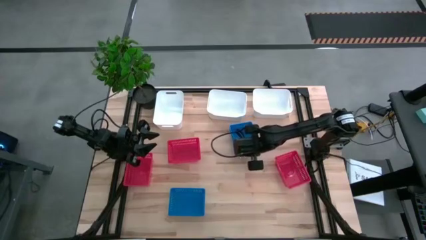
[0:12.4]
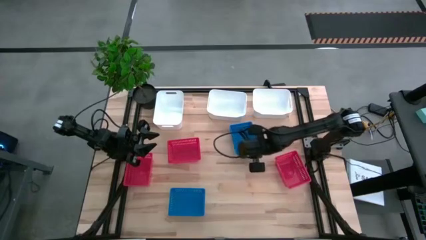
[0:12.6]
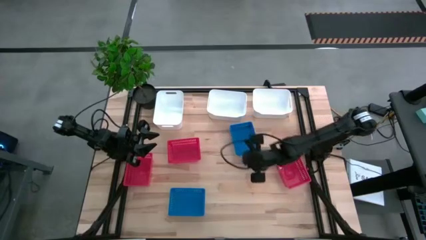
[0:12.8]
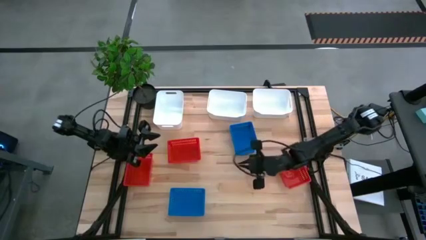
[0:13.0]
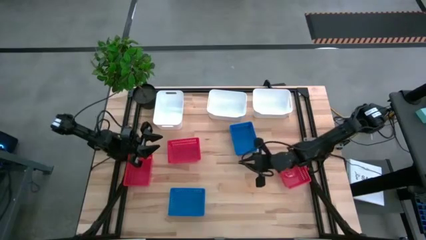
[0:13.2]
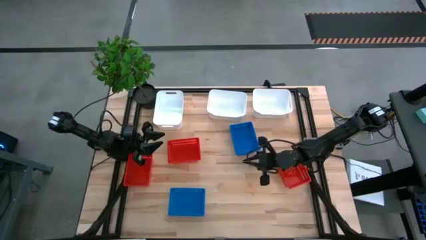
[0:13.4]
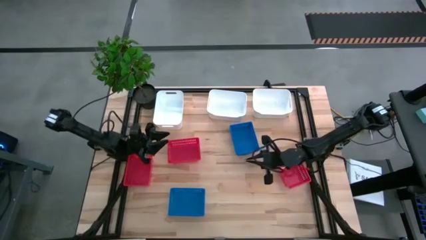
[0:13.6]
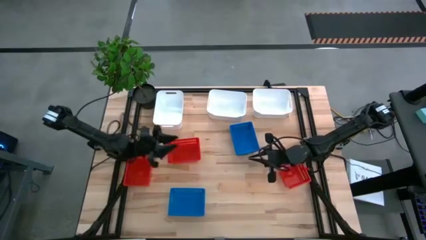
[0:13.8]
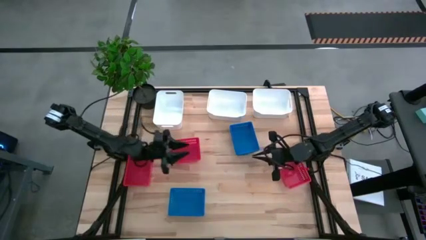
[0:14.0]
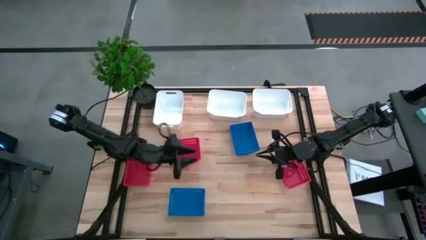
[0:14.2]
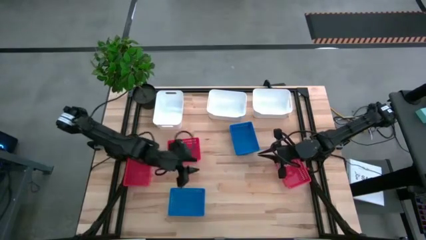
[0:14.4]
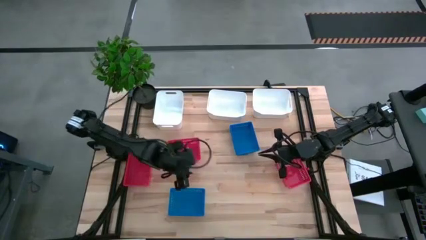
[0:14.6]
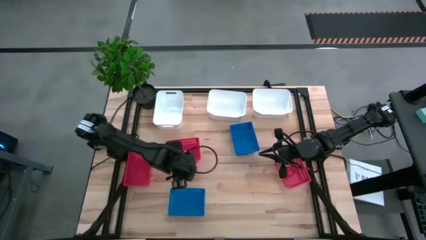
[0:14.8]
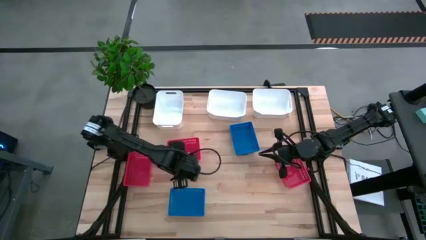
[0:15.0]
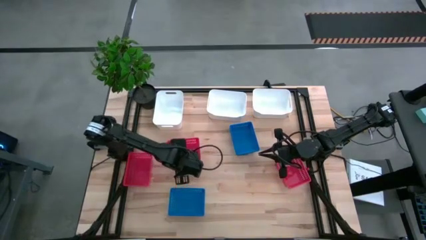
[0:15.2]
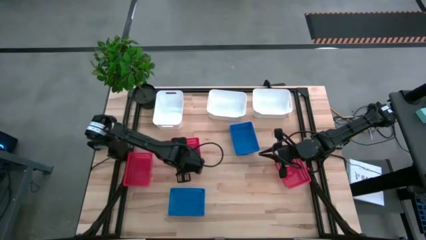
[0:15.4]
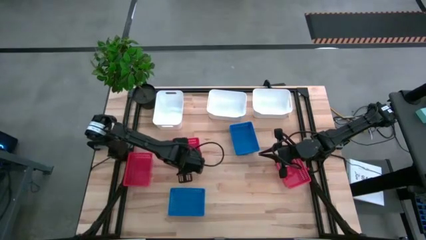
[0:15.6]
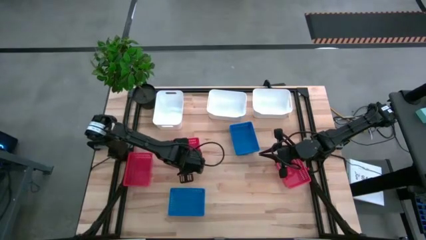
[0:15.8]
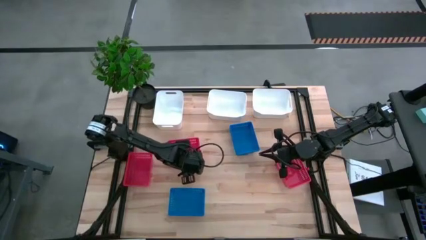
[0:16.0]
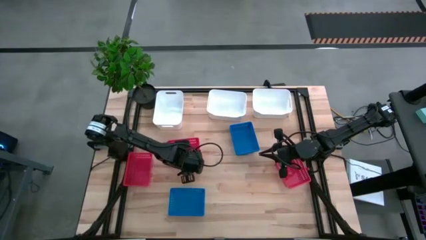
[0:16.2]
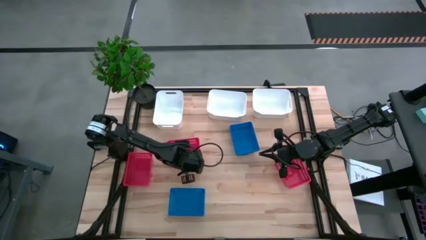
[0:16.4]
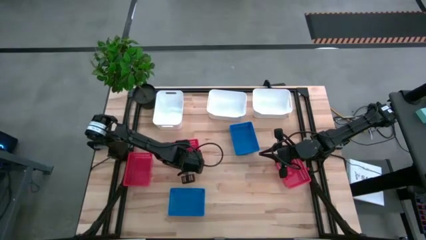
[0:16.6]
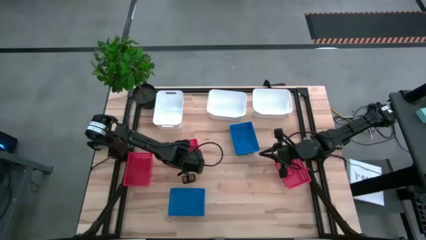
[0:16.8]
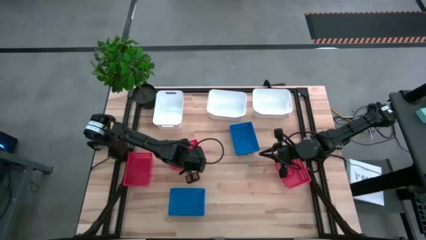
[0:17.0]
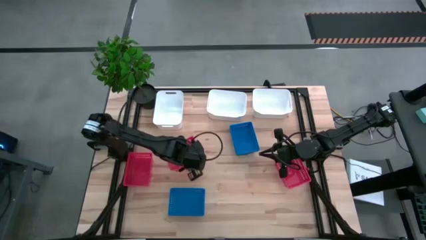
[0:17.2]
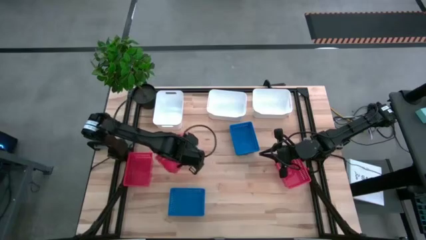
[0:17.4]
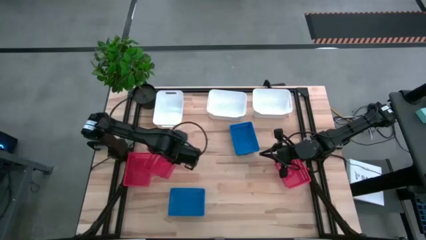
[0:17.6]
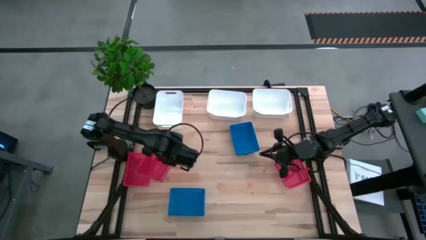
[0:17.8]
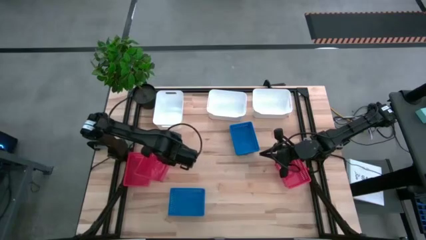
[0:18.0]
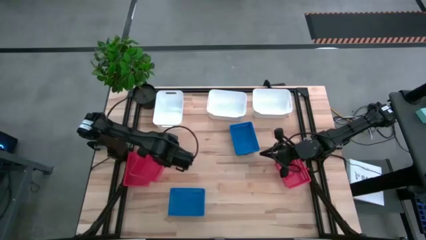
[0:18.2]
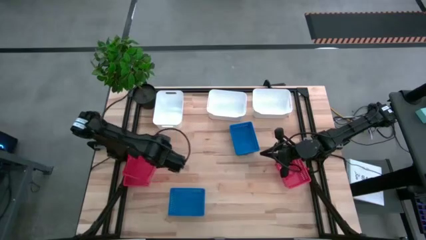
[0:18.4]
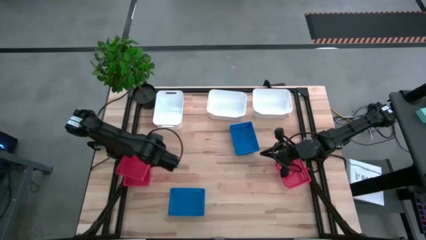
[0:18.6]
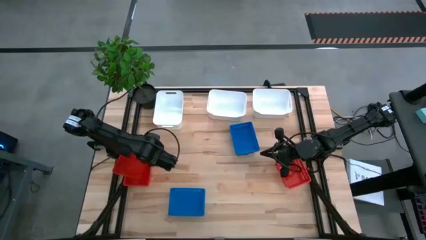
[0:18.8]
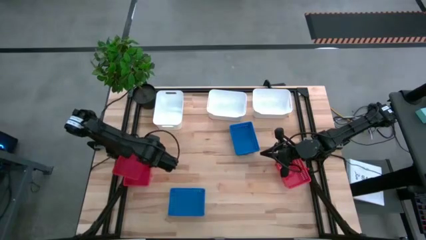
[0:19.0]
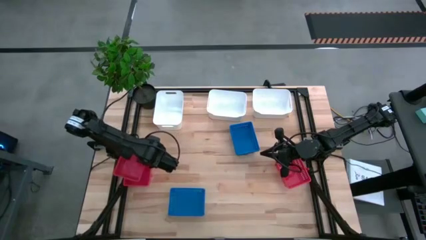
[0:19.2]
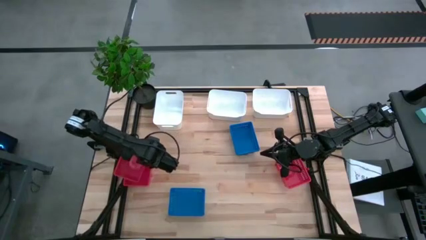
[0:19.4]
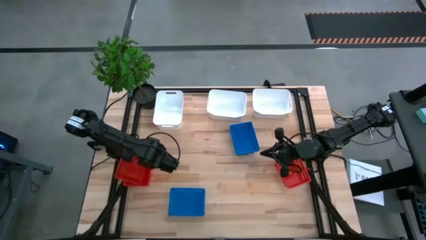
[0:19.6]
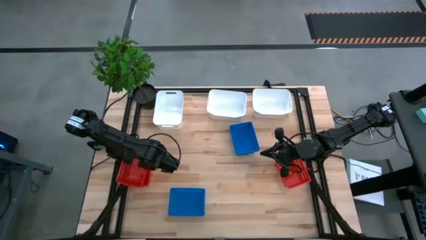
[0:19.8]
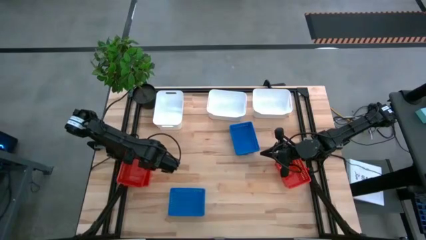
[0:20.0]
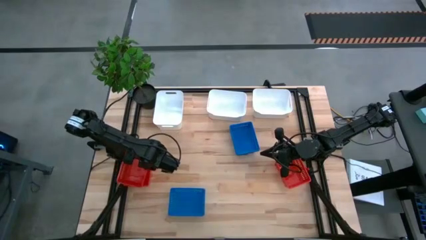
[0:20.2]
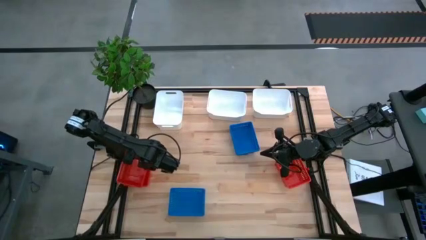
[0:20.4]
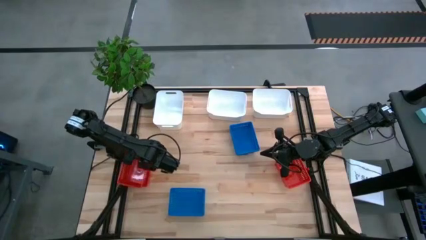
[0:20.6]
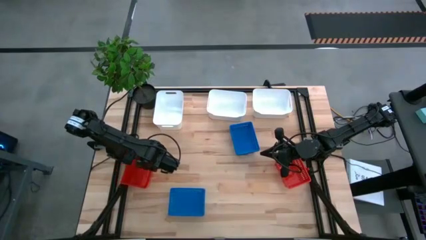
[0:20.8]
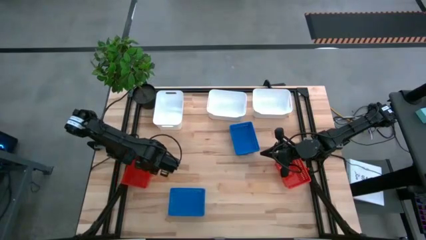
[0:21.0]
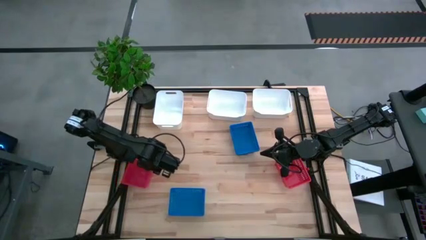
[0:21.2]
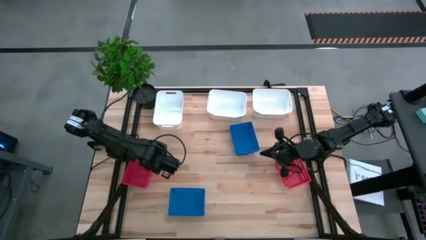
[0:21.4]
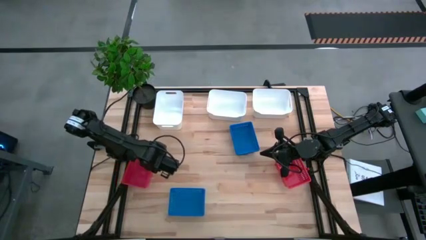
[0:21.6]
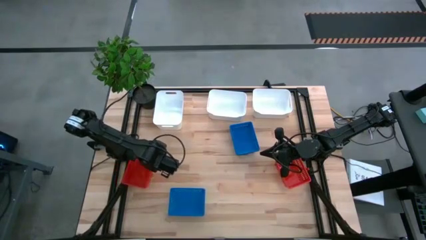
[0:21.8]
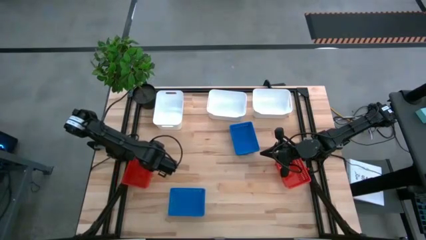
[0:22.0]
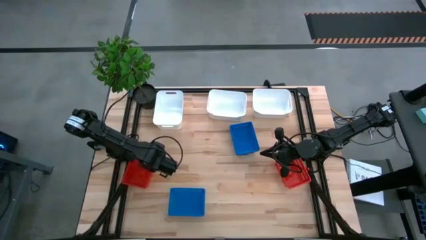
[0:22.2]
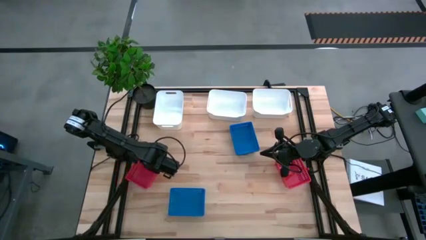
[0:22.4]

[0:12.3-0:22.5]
Stack the center red bin on the left red bin
